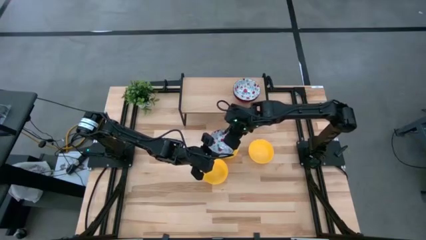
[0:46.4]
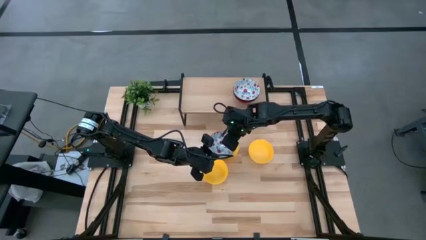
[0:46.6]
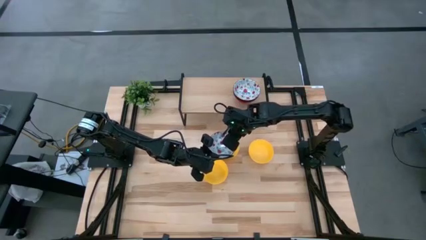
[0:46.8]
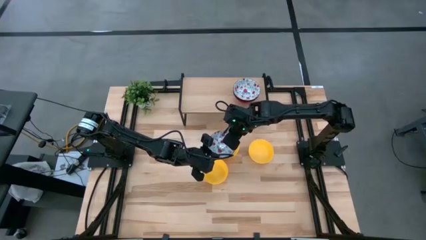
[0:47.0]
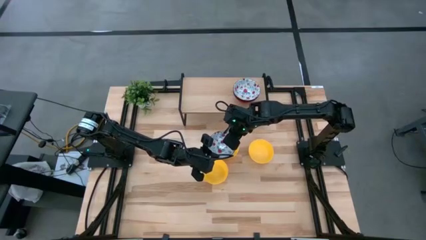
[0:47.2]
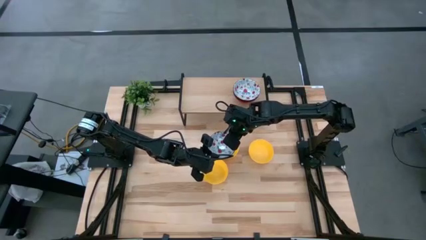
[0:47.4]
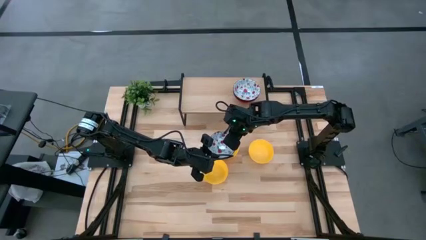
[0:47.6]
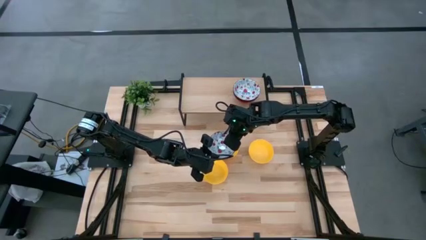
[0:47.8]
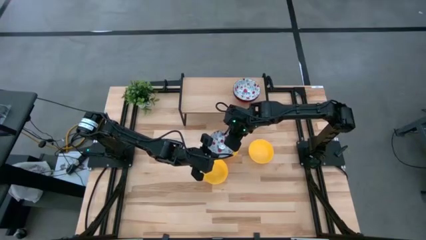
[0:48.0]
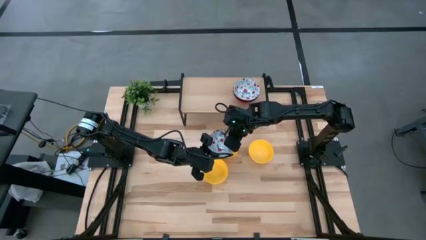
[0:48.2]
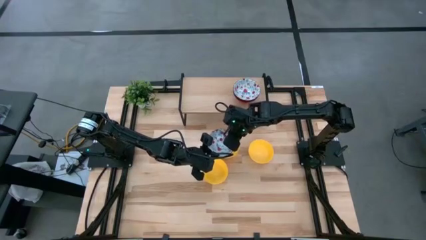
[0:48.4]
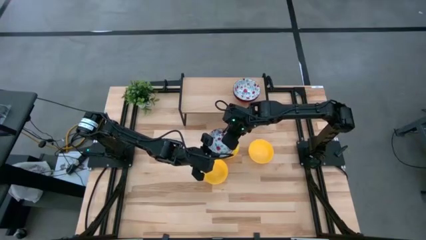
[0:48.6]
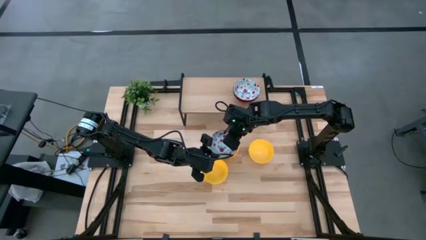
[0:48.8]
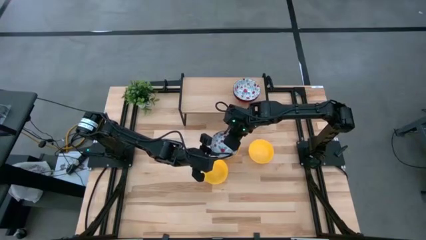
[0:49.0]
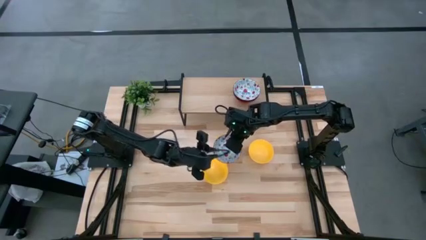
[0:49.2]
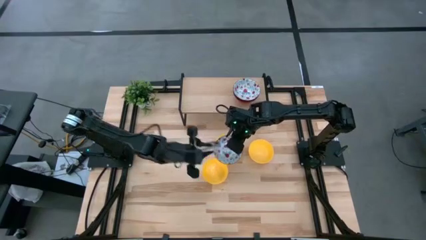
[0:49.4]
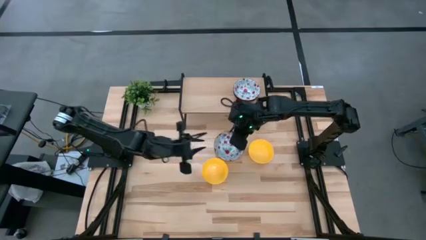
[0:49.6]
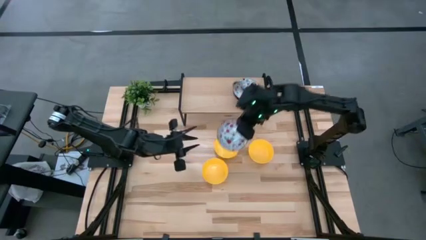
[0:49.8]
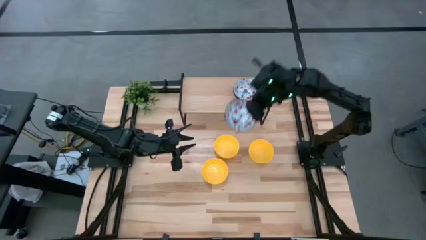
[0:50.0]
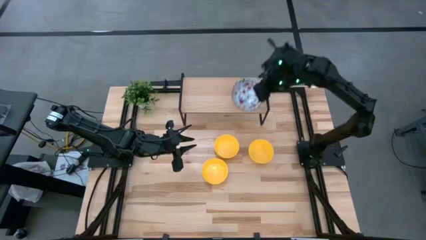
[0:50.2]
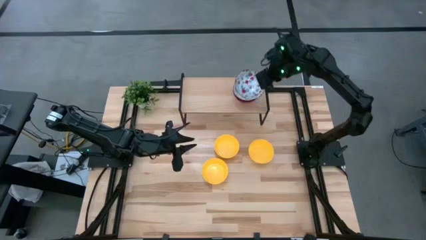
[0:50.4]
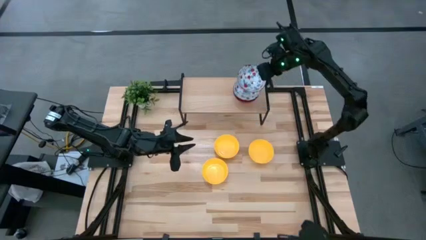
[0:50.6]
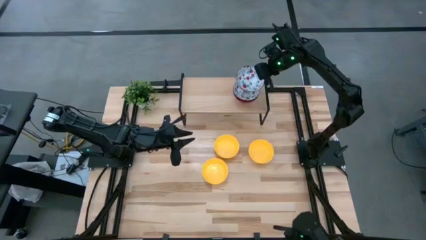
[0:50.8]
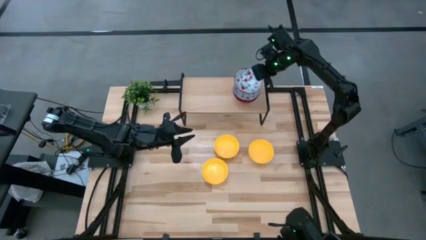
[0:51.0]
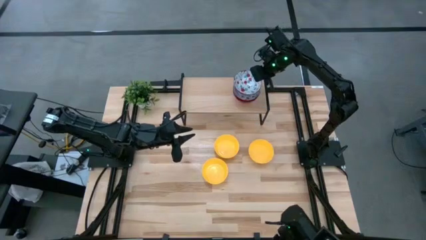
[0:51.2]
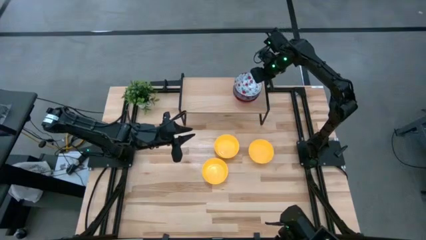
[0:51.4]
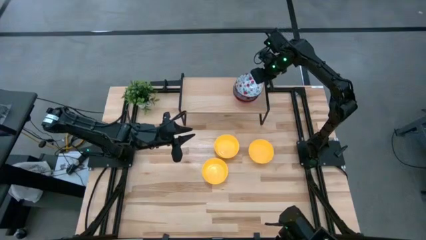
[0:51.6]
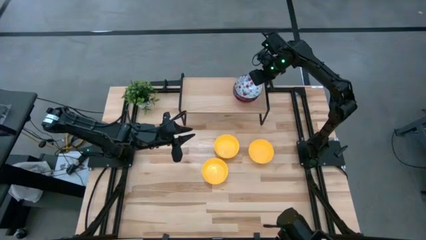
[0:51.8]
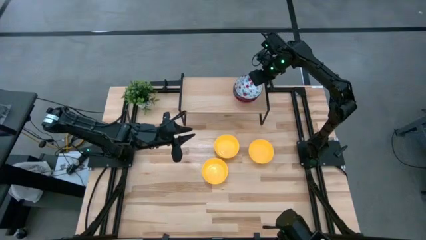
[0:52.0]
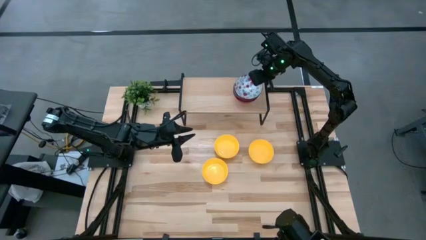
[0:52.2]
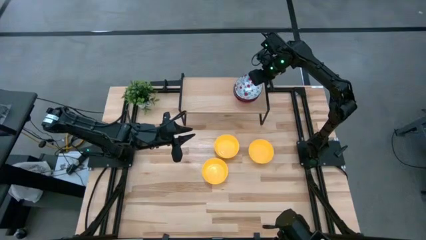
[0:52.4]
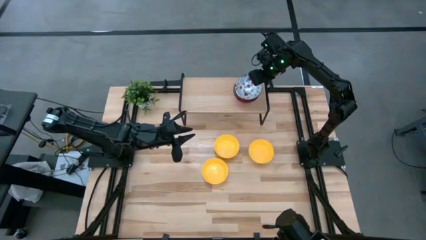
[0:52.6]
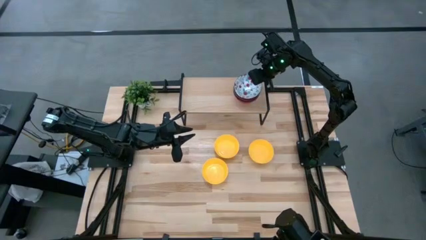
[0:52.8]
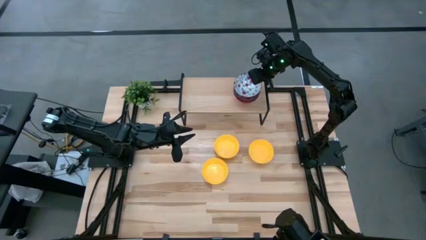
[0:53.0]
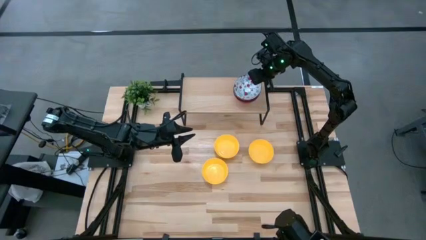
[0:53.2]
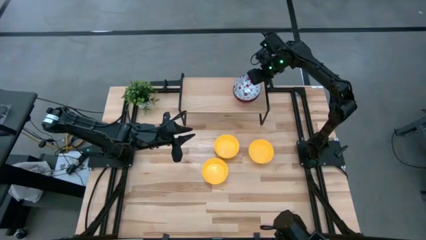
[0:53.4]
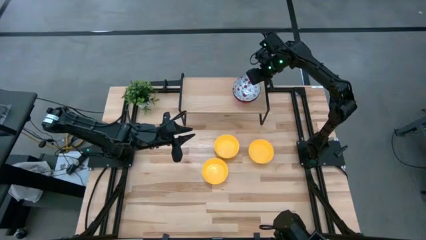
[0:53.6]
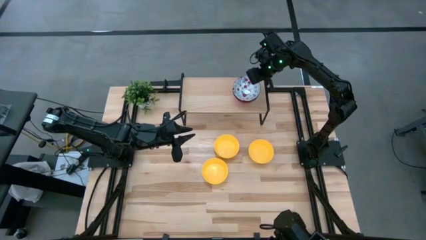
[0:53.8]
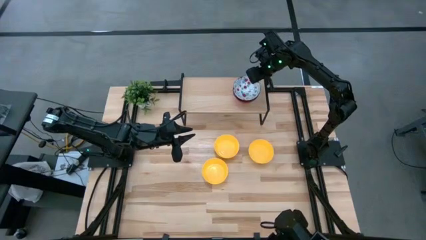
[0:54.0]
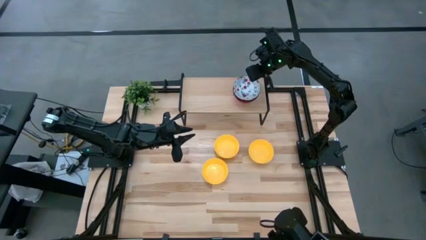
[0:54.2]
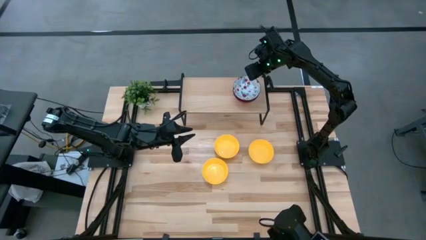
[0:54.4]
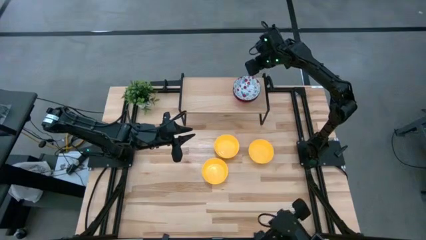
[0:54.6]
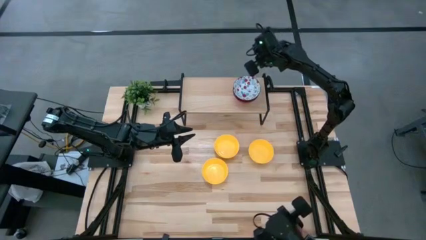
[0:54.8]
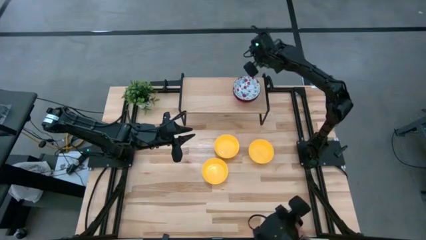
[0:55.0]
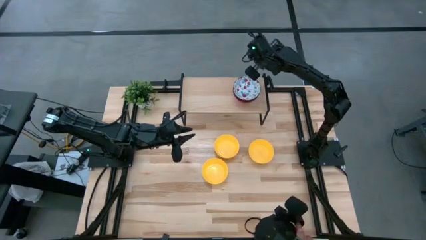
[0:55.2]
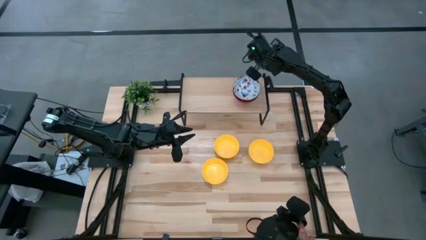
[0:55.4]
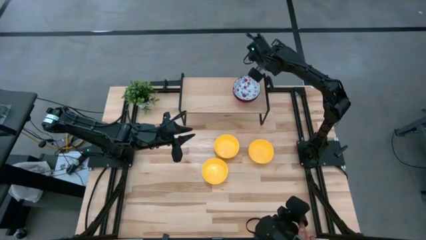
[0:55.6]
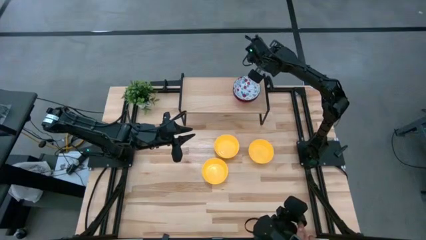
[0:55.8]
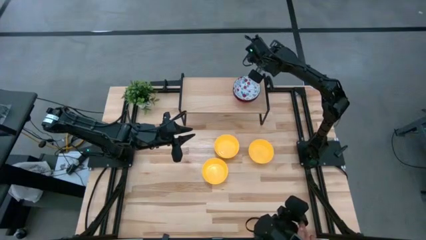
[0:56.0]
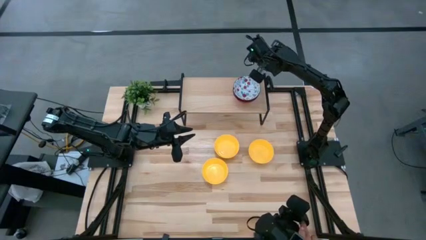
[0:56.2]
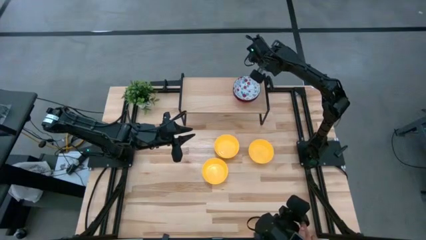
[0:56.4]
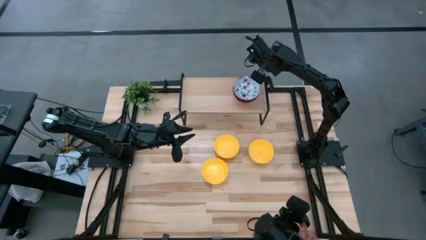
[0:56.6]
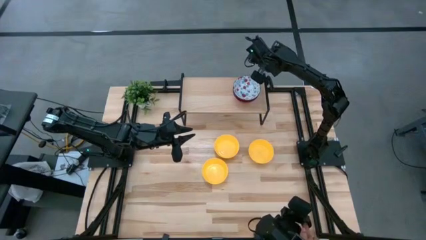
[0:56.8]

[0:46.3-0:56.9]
Task: Pick & Place Mini bowls
Stack the white patterned bowl on top of the stacked white patterned bowls on the shelf

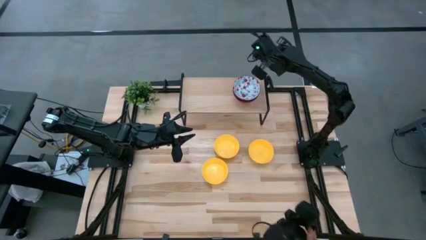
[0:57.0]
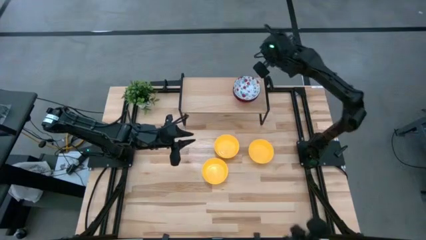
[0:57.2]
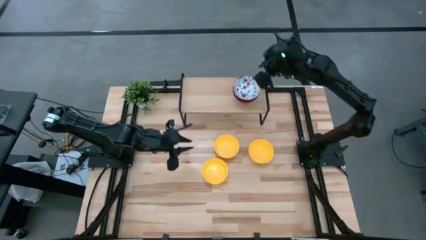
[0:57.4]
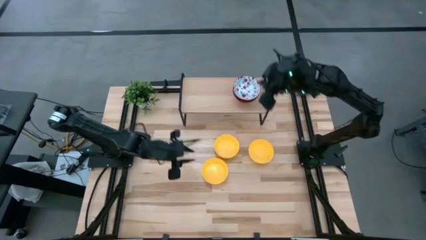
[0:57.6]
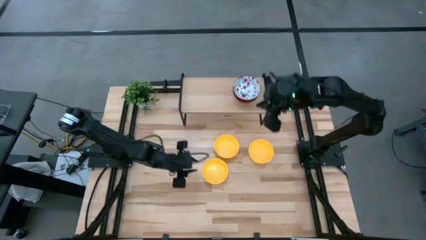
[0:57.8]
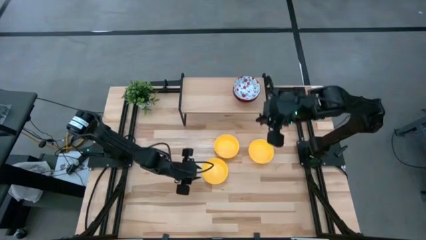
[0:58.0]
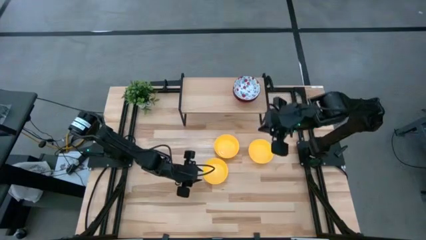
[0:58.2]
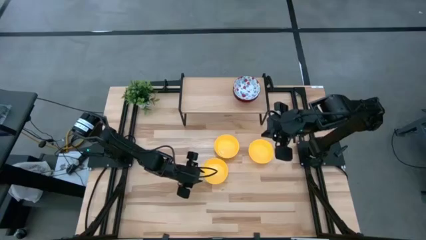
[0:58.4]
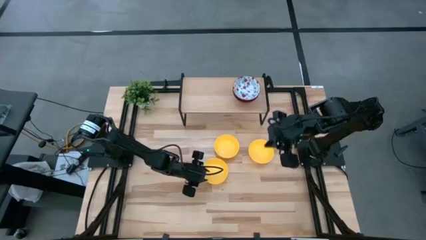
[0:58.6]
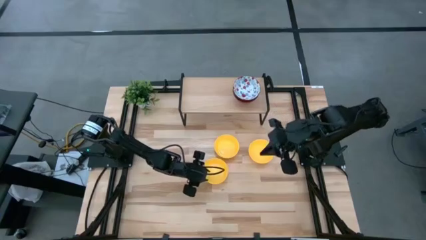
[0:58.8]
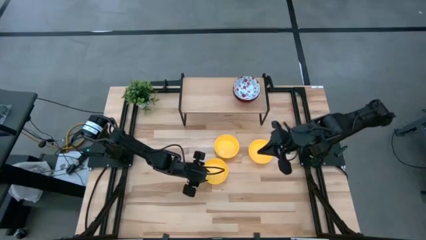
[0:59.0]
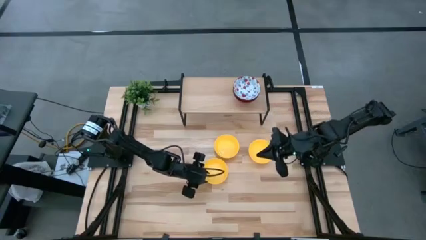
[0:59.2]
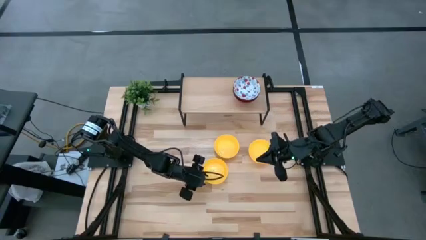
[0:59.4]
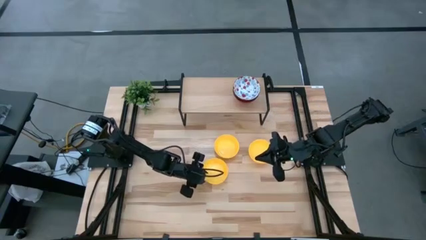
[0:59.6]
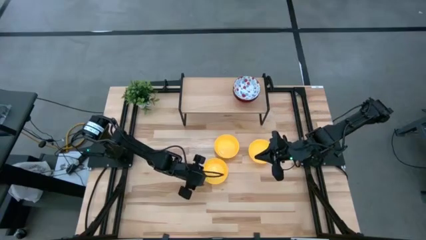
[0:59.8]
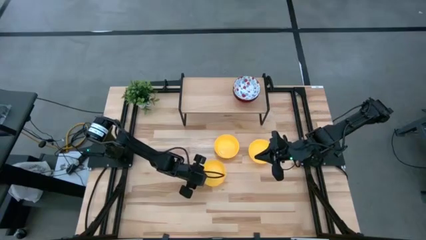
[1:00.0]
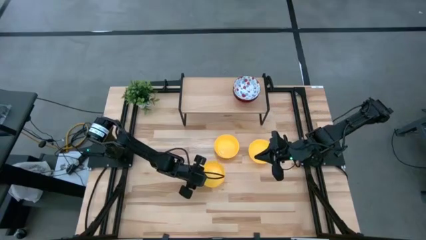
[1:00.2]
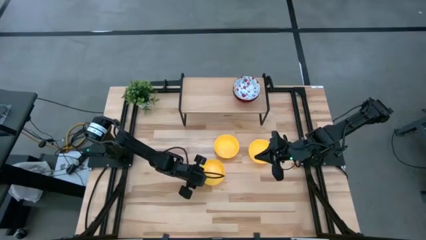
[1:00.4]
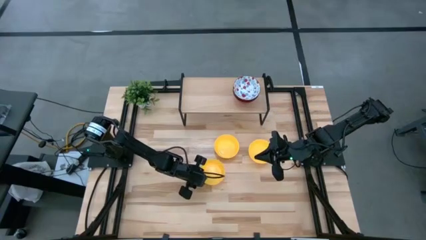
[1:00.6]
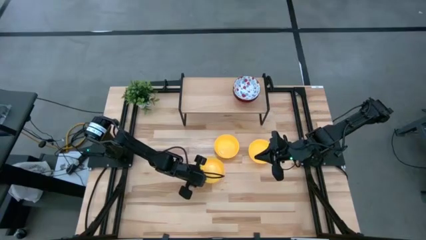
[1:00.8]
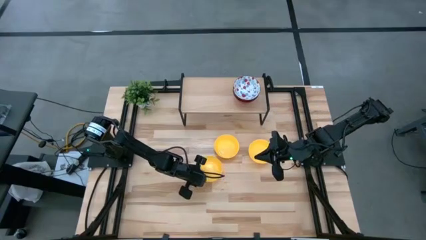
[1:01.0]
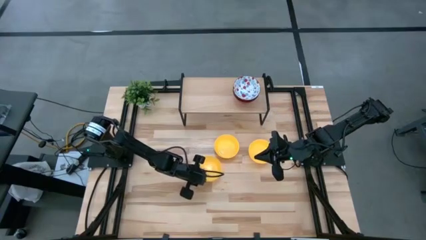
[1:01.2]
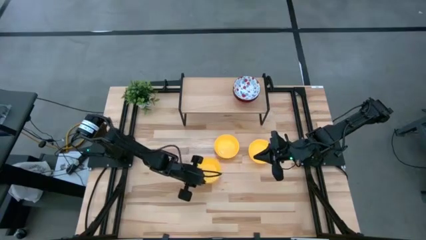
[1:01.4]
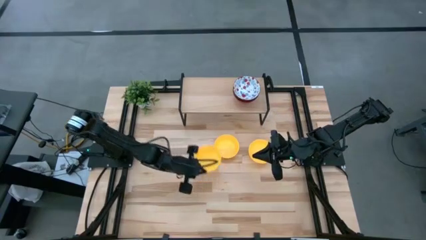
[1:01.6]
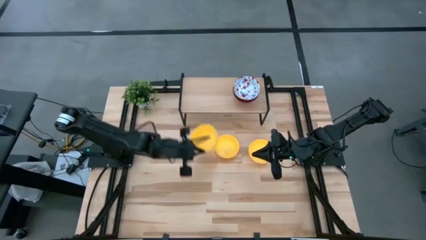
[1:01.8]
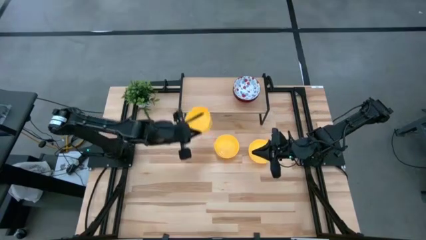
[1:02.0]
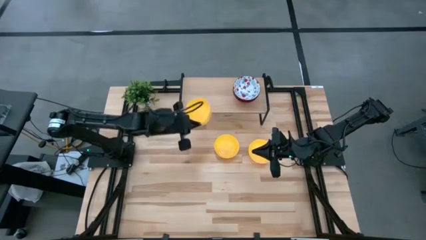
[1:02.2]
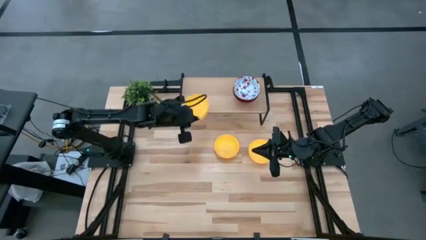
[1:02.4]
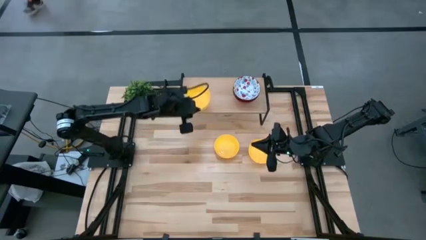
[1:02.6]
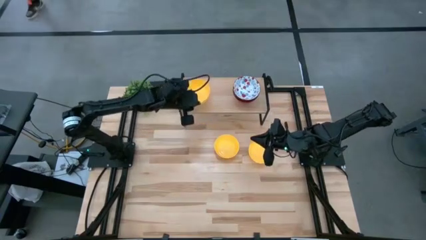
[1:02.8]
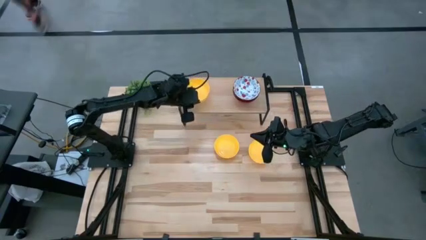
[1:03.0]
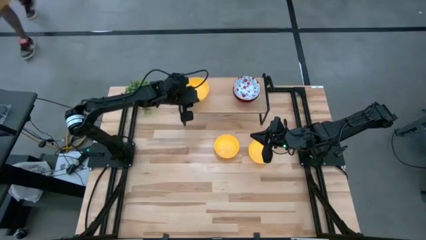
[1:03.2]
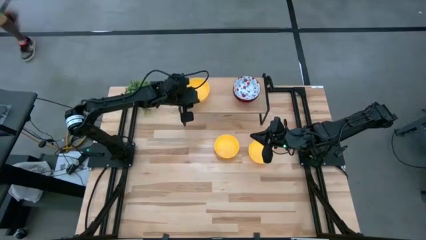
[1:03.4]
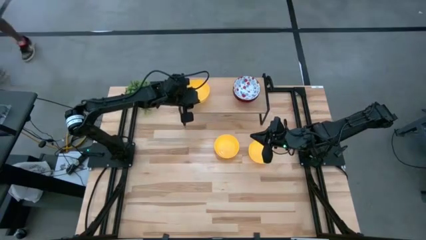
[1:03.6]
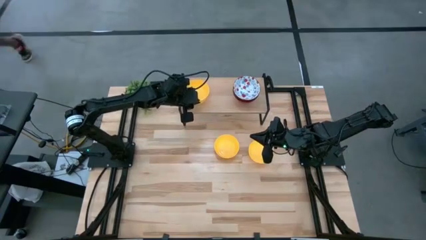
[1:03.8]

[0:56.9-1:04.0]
Put the bottom yellow bowl on the shelf
